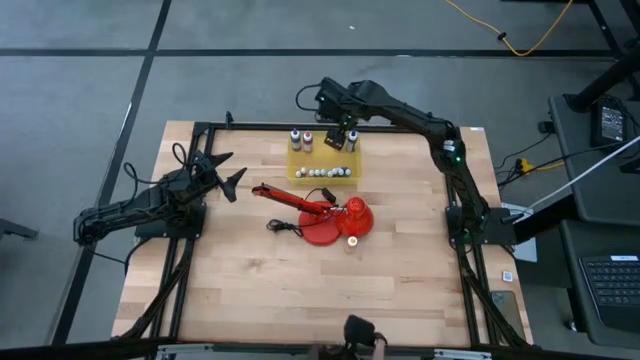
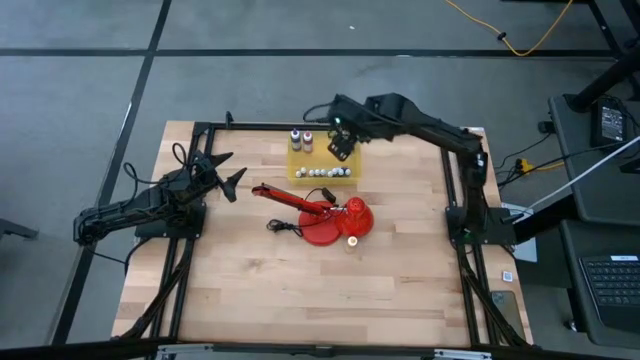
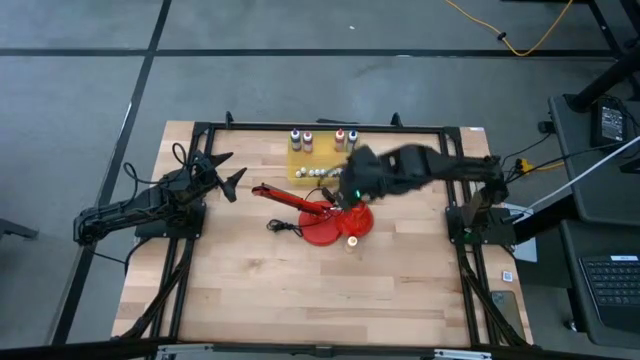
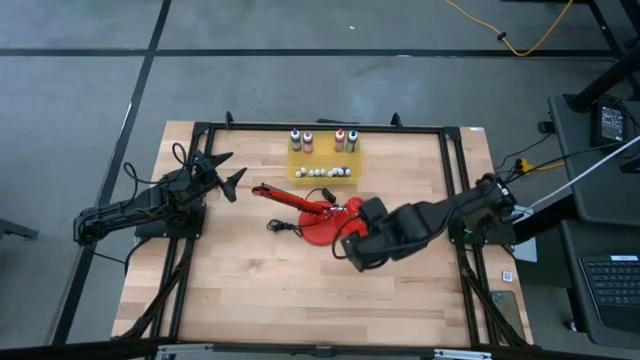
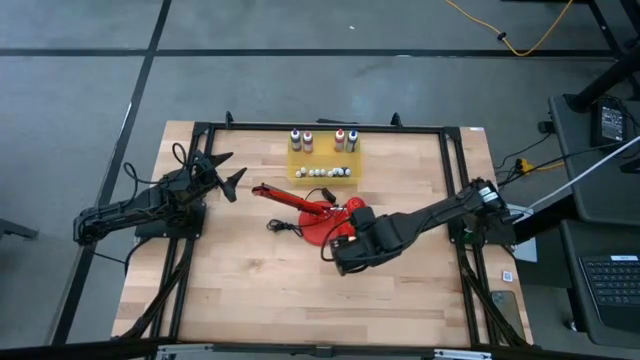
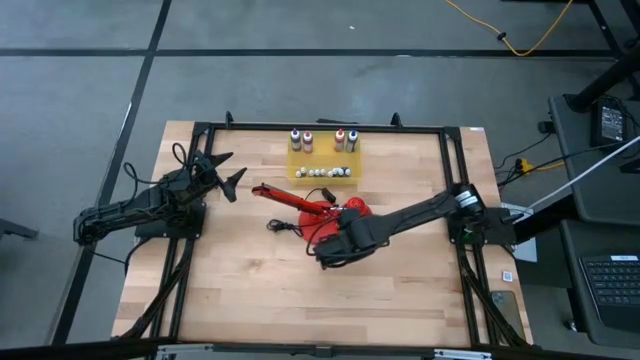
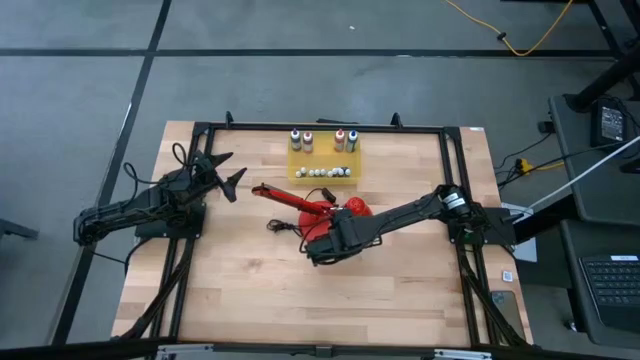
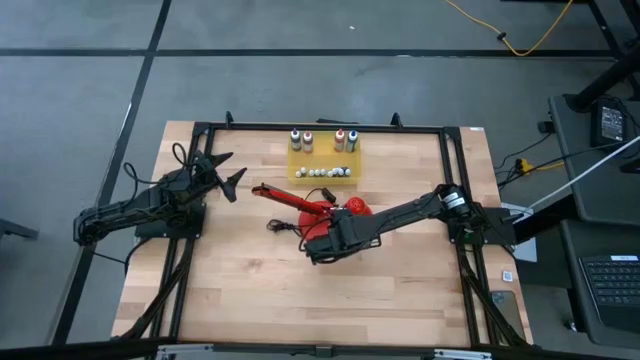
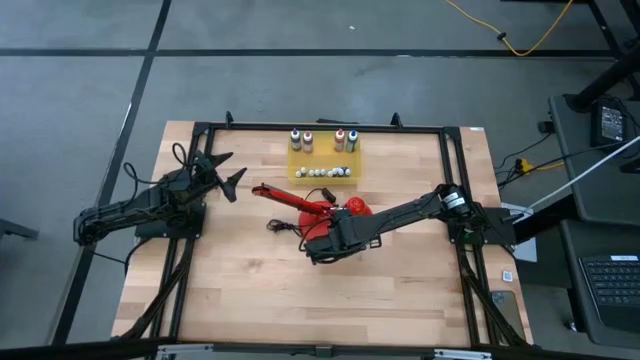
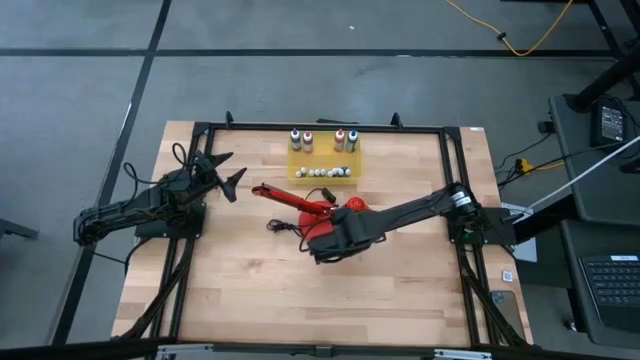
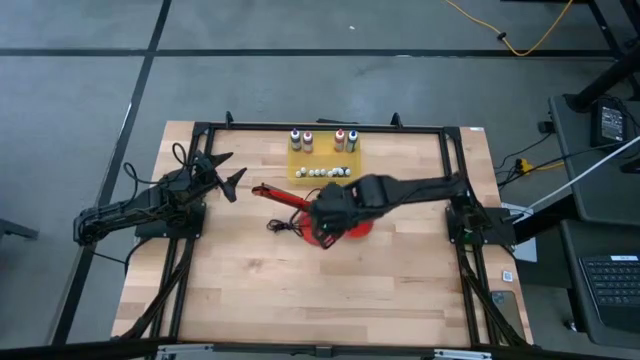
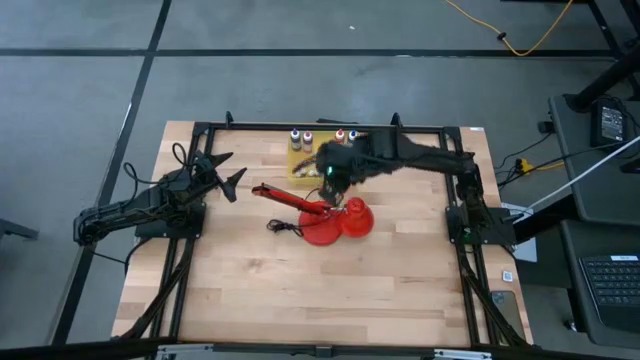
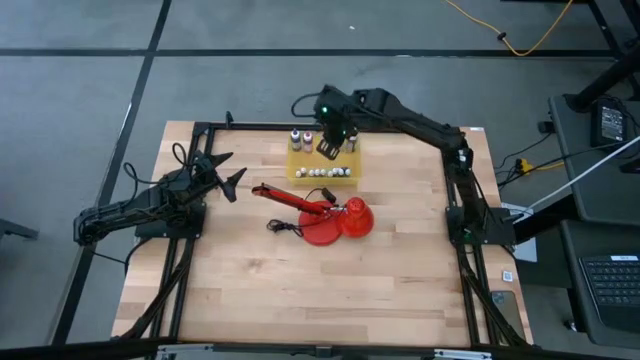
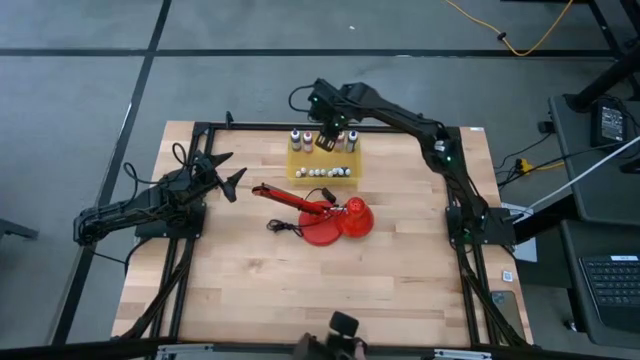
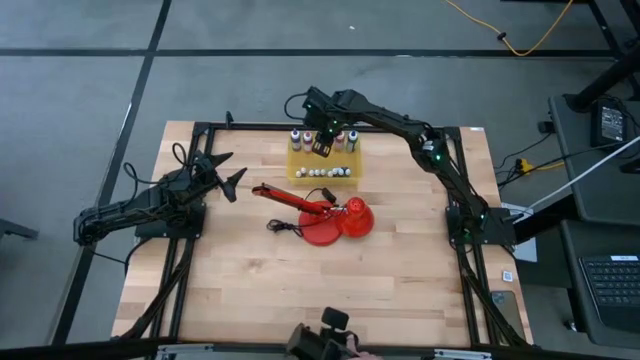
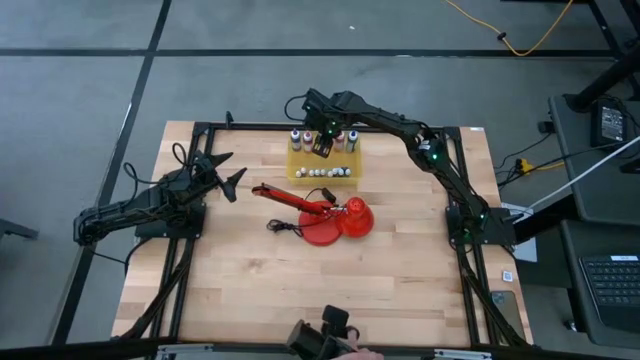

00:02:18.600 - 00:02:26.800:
Task: Pick & Place food coloring
Put the yellow food coloring bottle into the yellow bin

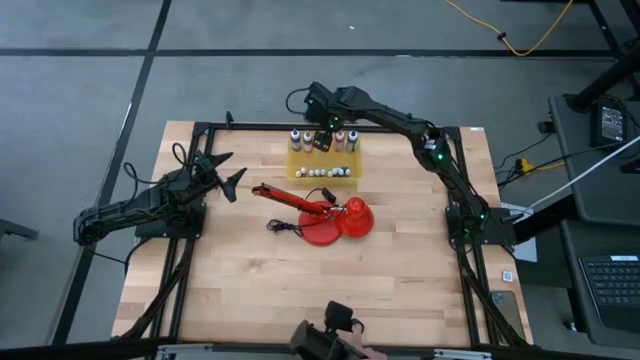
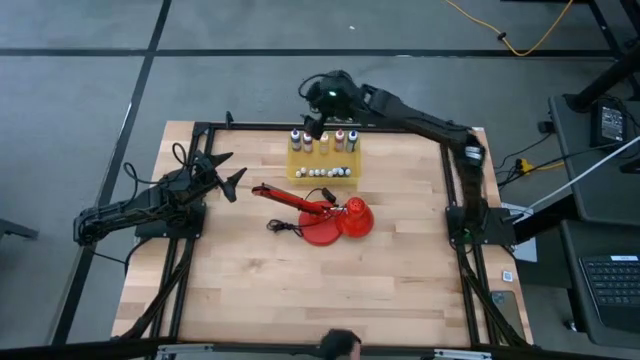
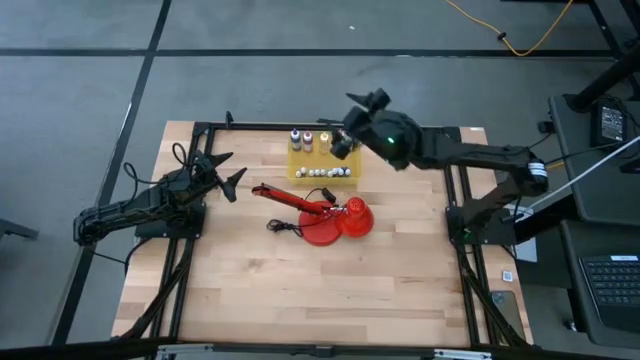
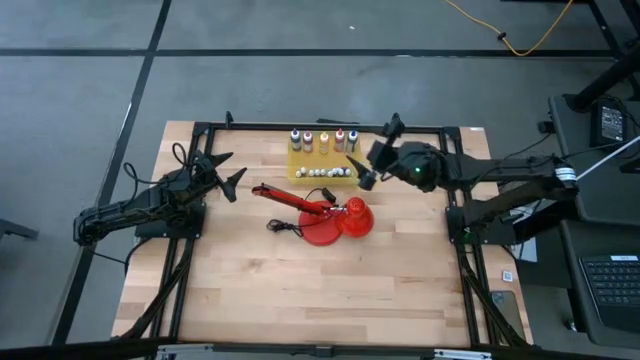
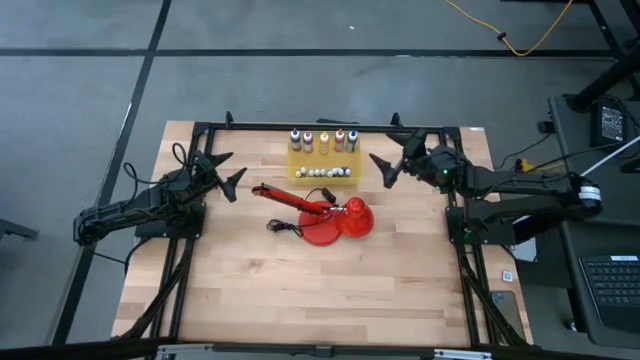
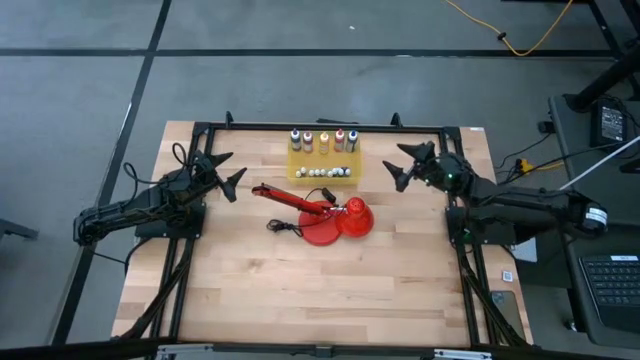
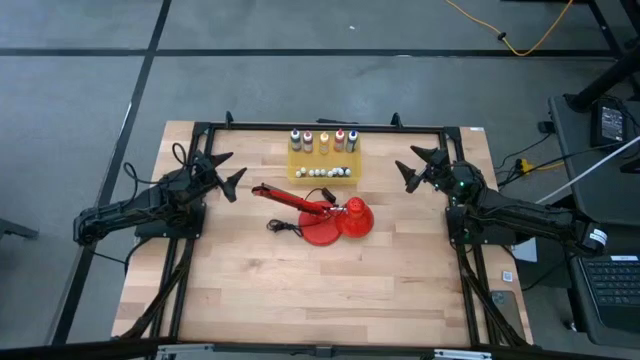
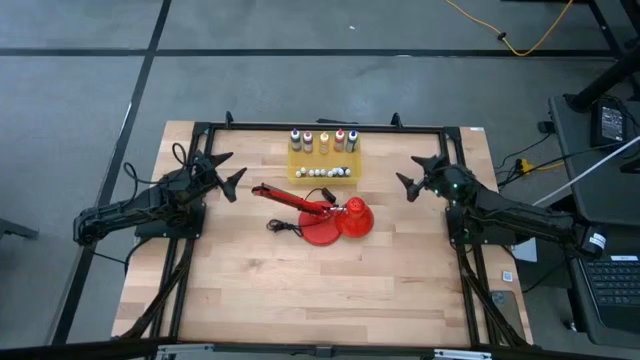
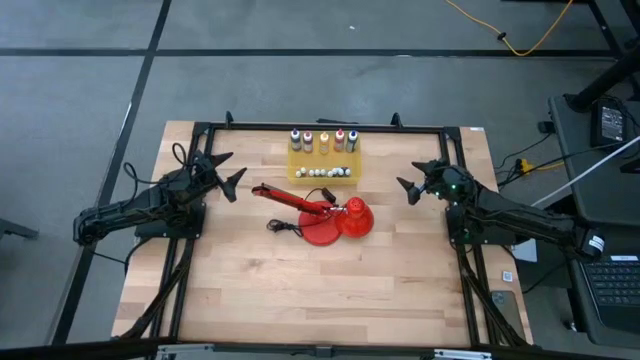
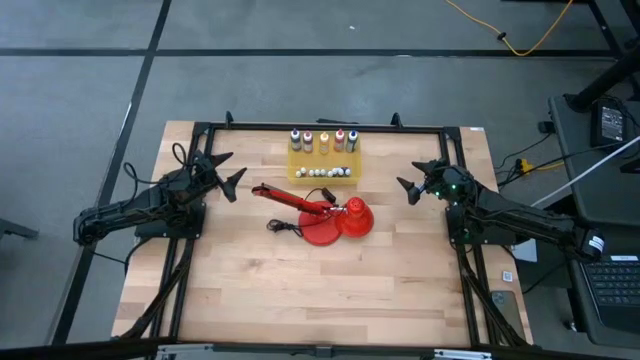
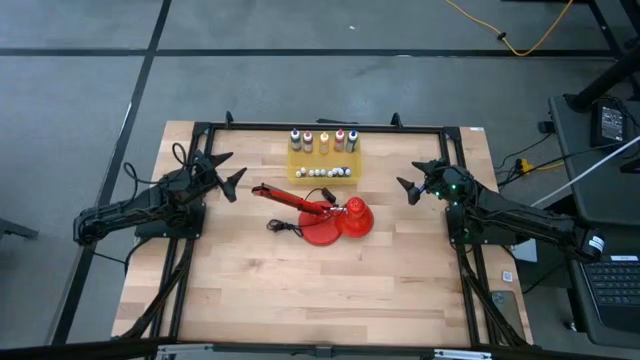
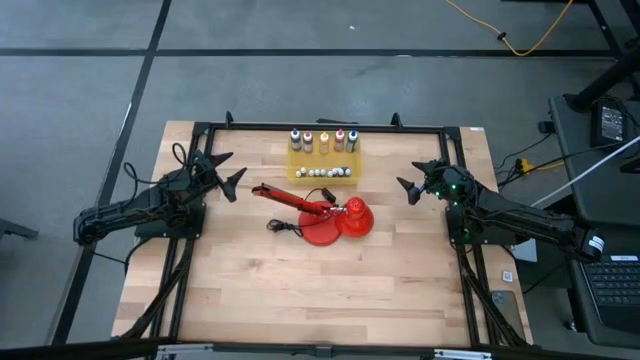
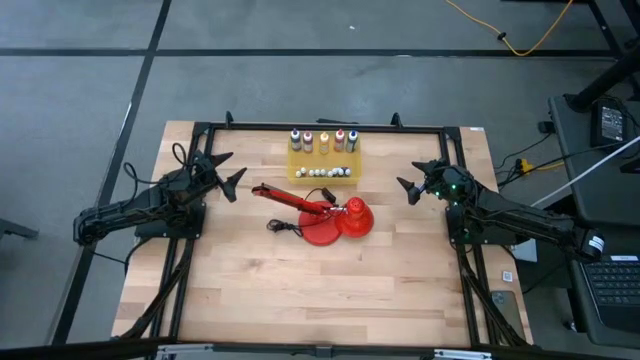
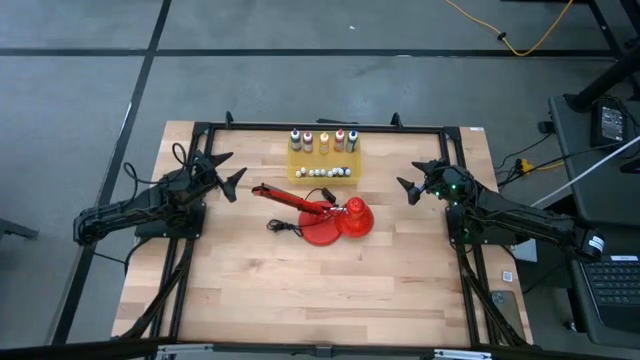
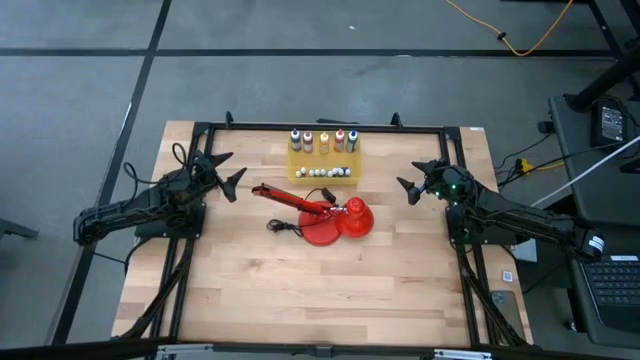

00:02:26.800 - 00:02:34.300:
Return to Home Position

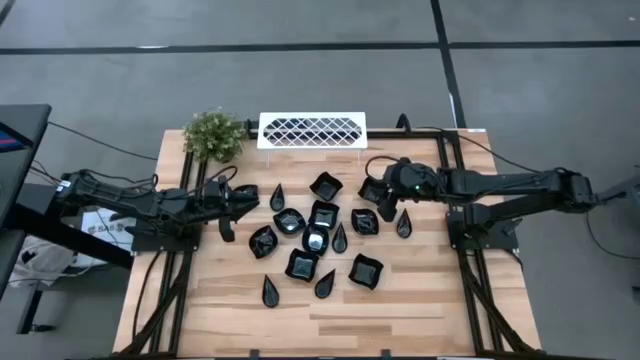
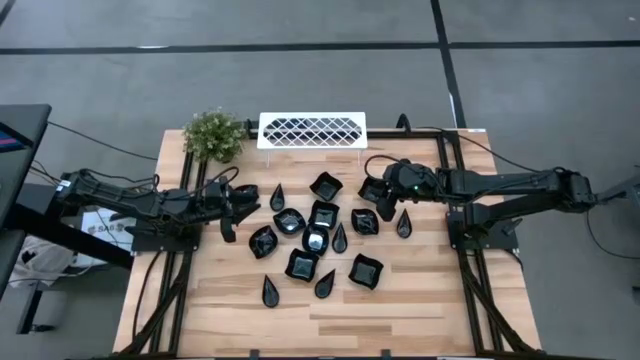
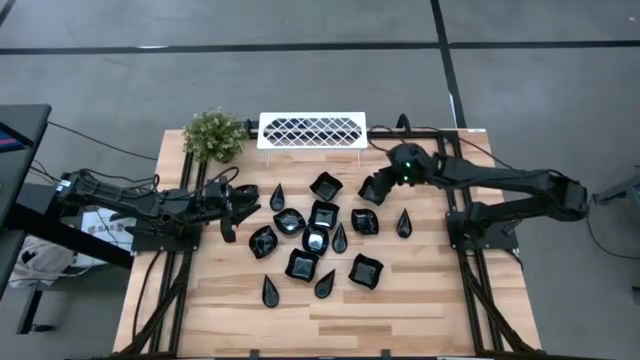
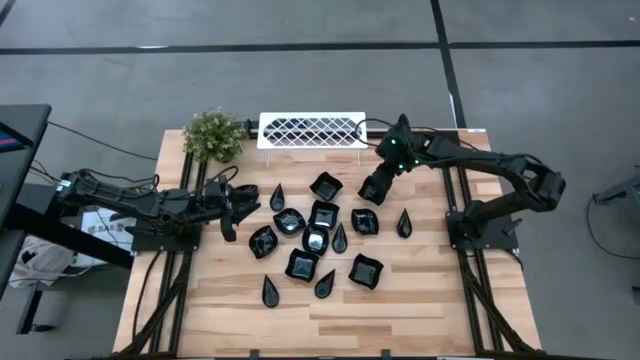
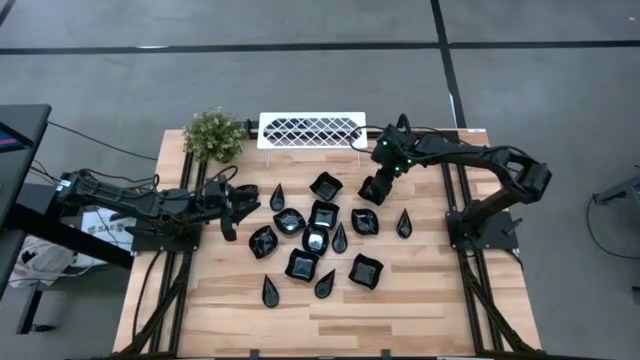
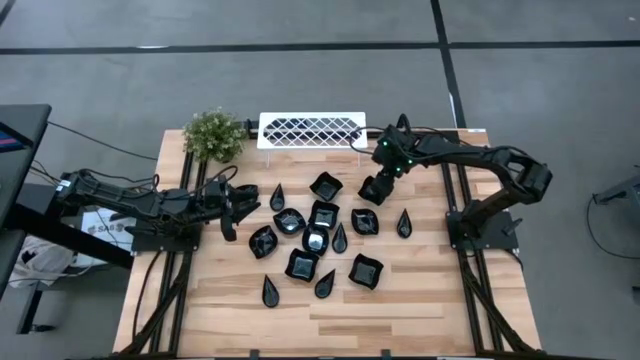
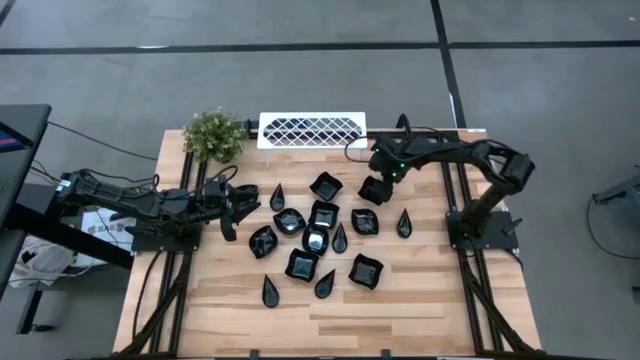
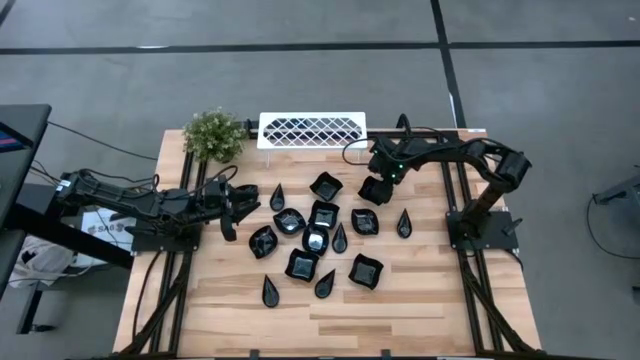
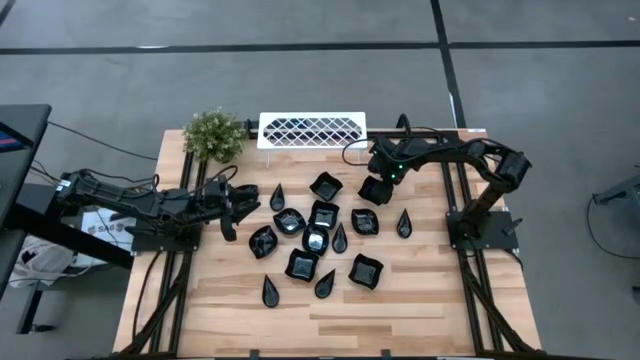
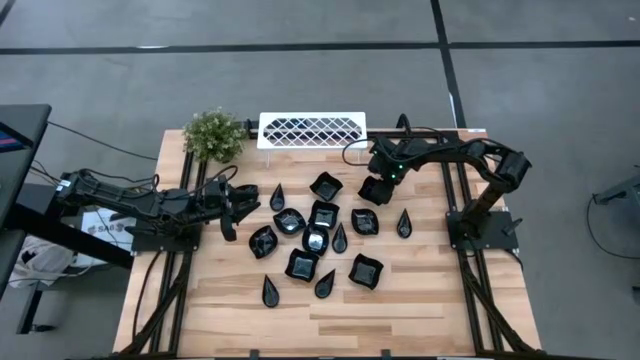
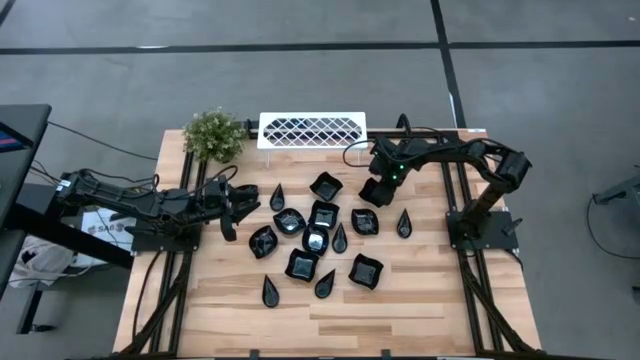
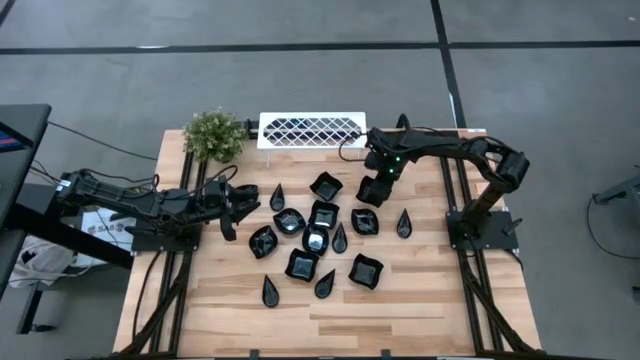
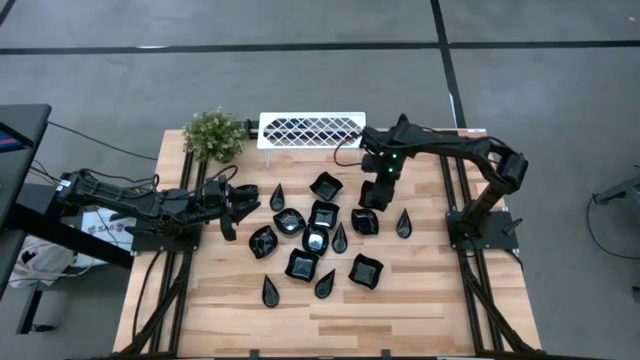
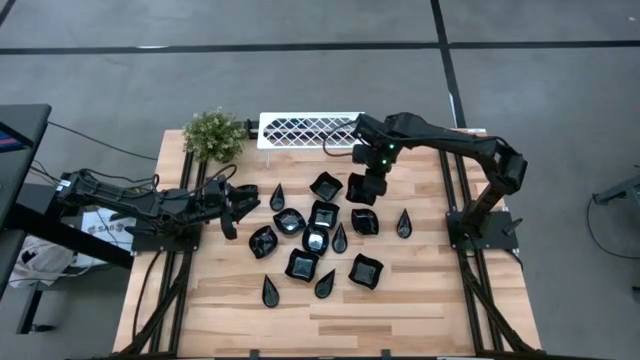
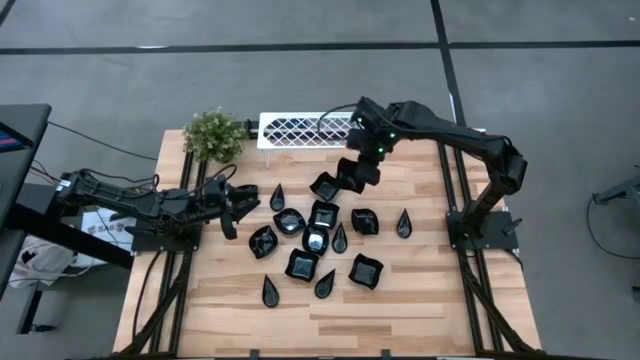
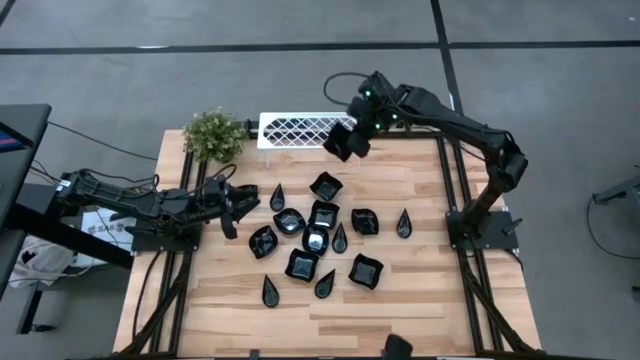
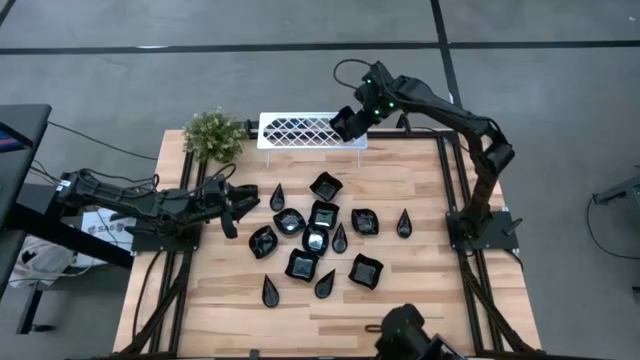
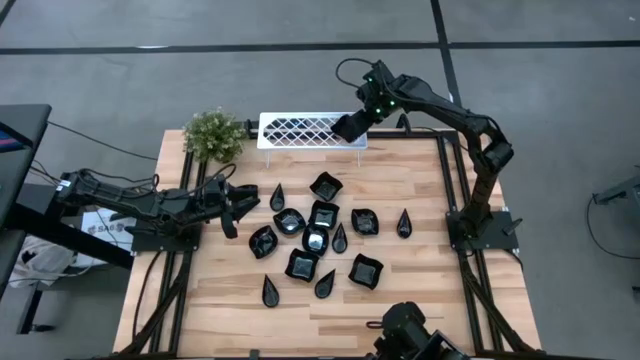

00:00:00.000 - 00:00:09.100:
Task: Pick & Place Mini shaped plates
Put the distorted square plate on the shelf
